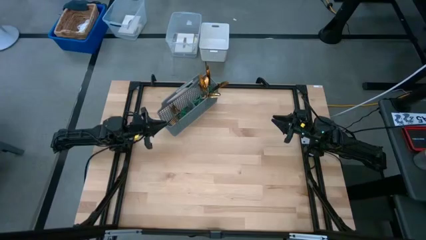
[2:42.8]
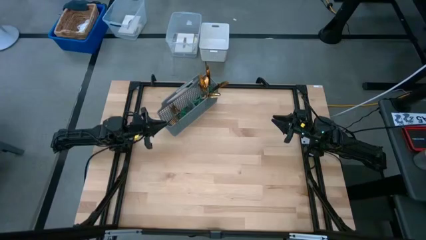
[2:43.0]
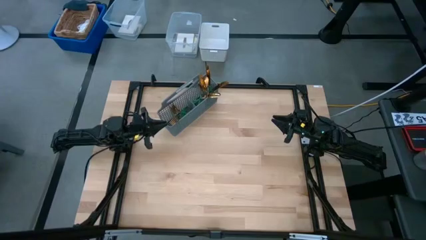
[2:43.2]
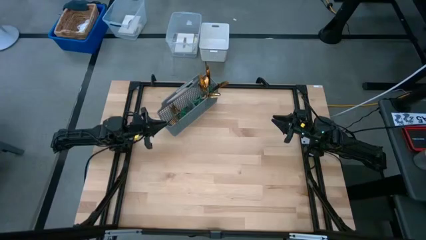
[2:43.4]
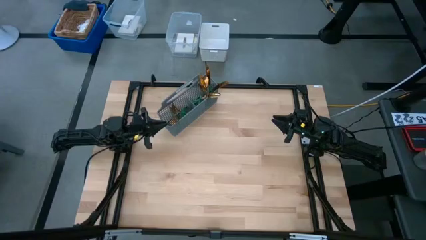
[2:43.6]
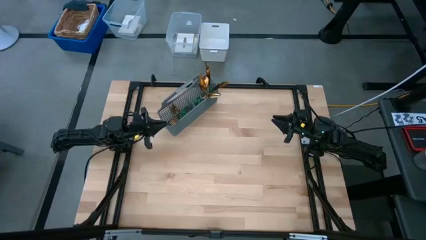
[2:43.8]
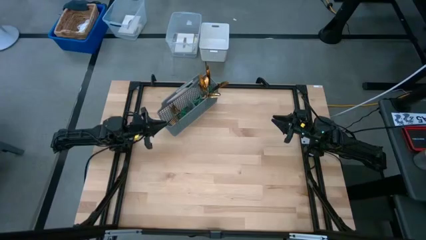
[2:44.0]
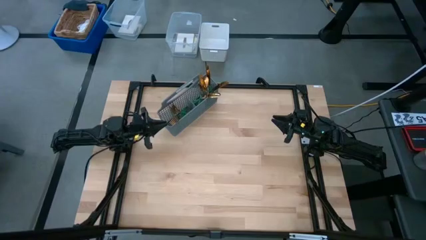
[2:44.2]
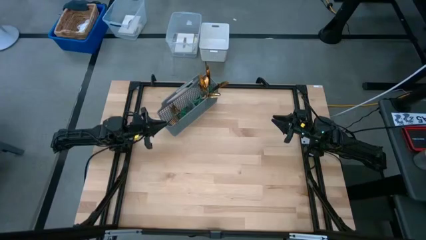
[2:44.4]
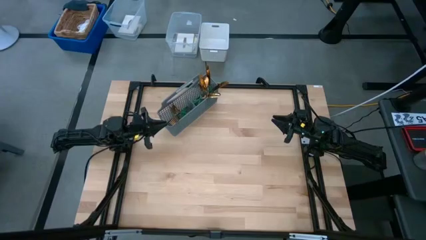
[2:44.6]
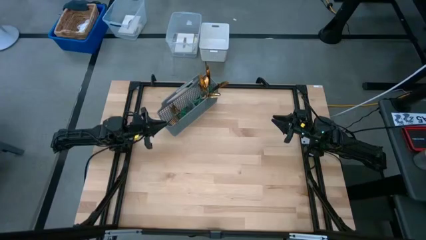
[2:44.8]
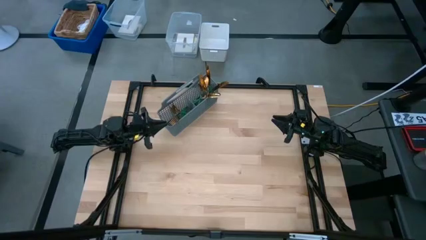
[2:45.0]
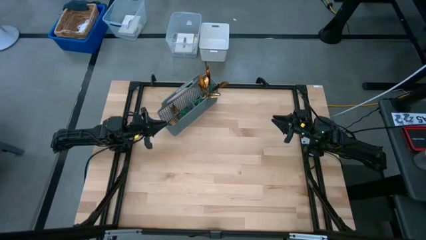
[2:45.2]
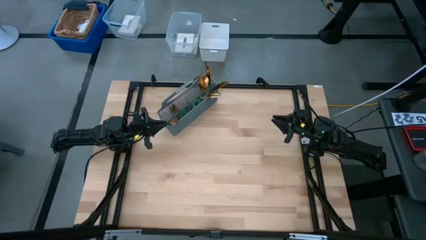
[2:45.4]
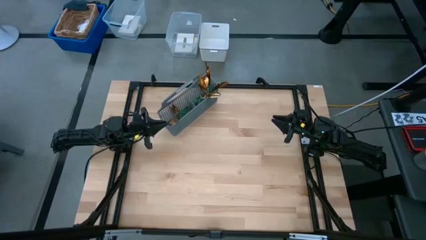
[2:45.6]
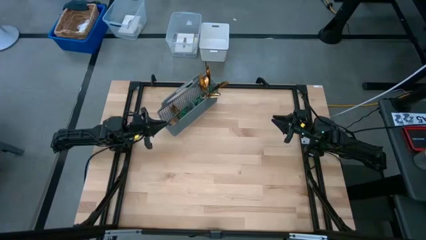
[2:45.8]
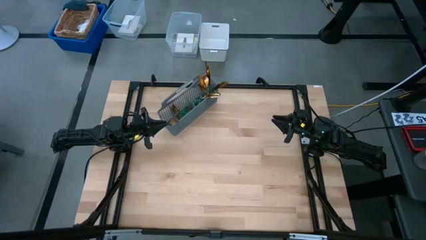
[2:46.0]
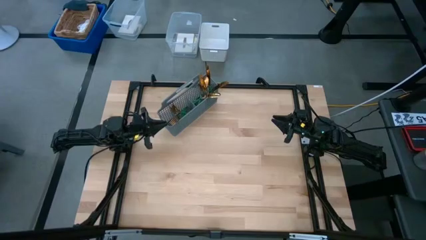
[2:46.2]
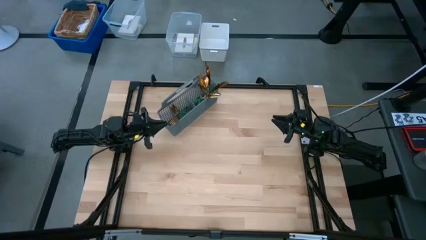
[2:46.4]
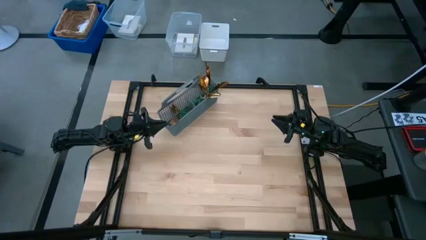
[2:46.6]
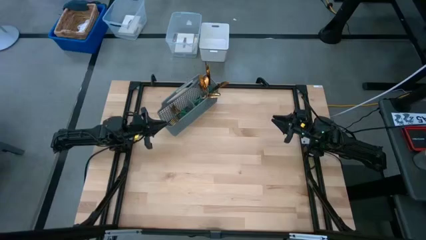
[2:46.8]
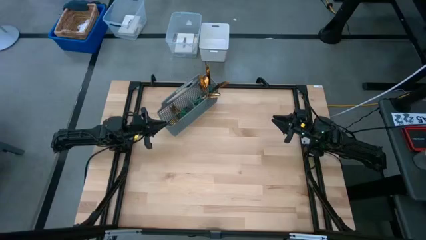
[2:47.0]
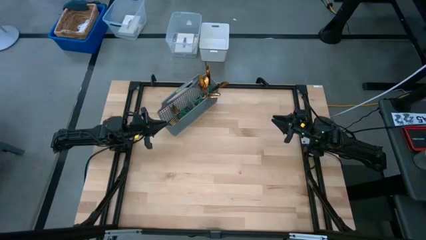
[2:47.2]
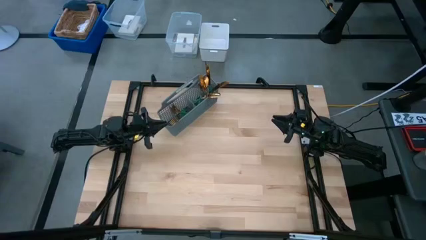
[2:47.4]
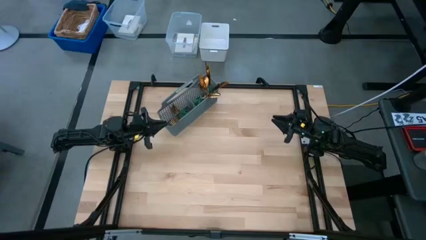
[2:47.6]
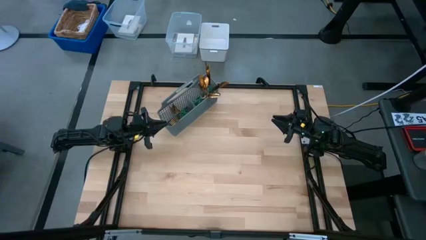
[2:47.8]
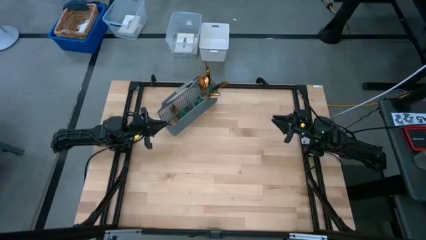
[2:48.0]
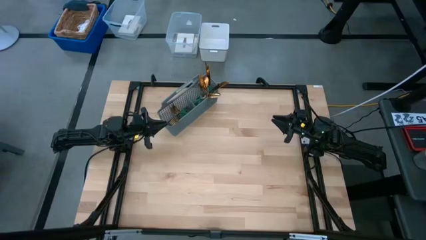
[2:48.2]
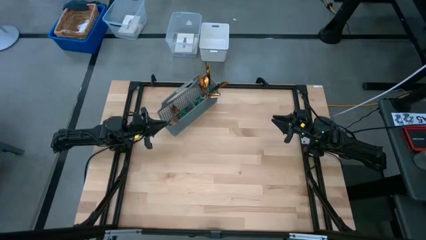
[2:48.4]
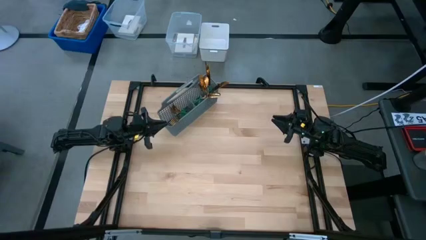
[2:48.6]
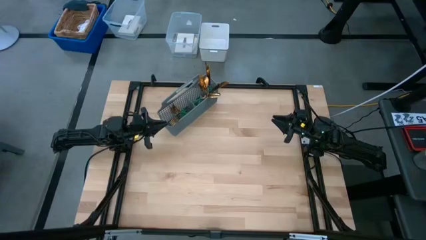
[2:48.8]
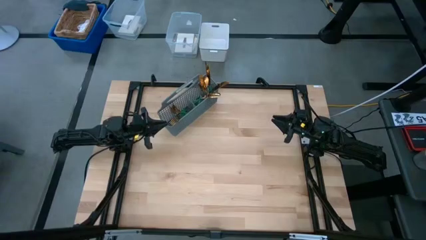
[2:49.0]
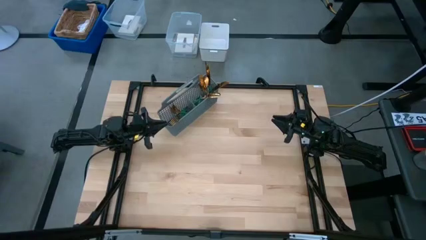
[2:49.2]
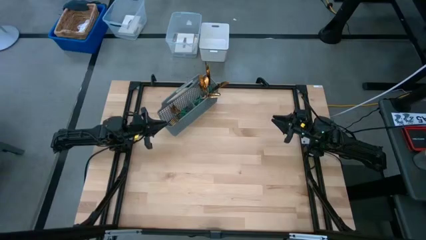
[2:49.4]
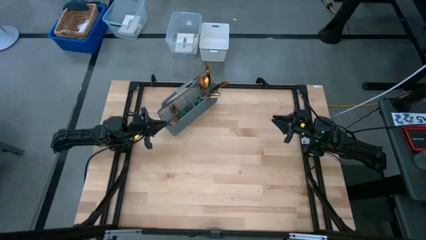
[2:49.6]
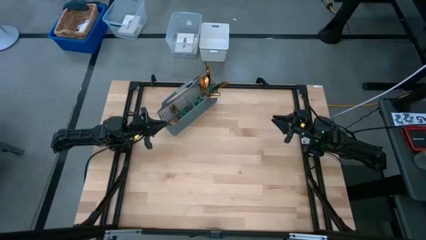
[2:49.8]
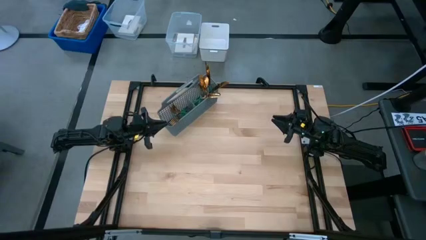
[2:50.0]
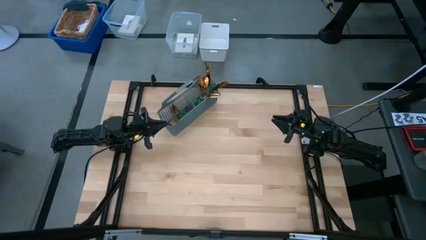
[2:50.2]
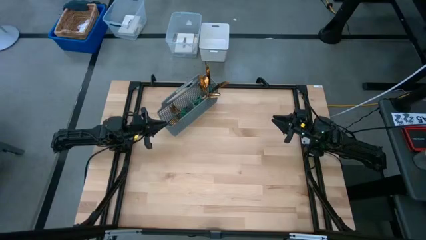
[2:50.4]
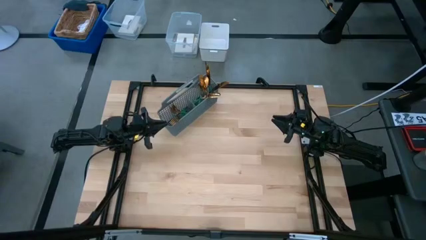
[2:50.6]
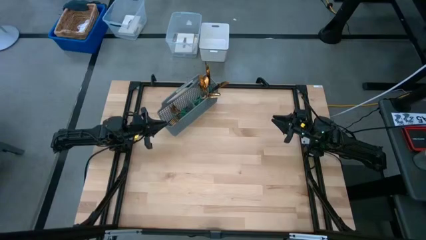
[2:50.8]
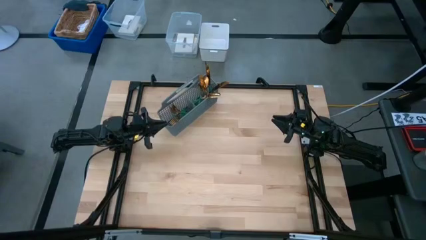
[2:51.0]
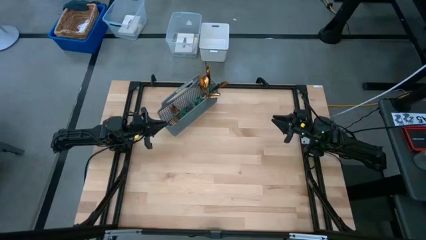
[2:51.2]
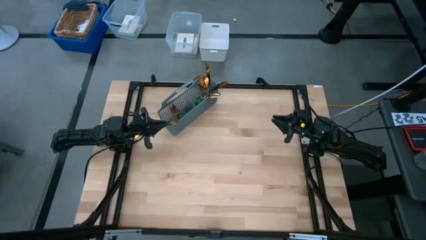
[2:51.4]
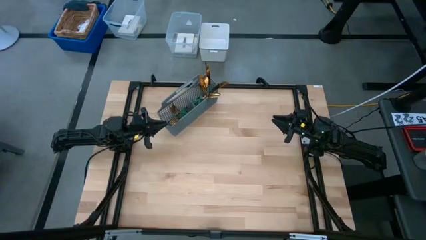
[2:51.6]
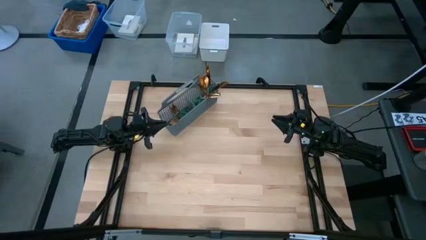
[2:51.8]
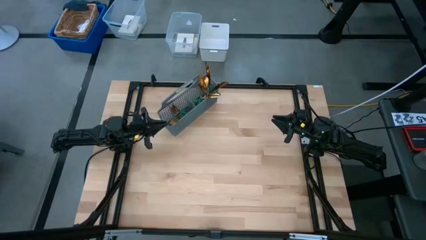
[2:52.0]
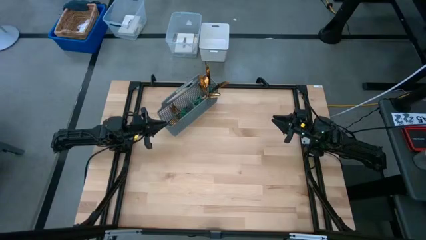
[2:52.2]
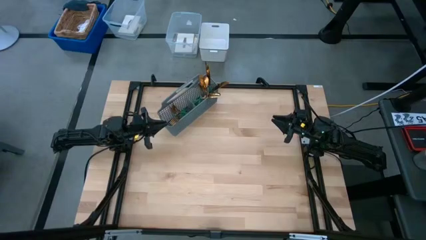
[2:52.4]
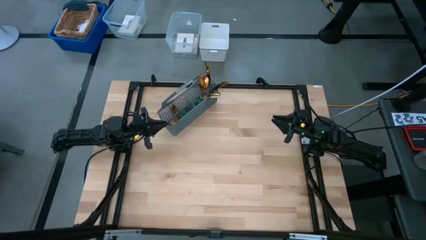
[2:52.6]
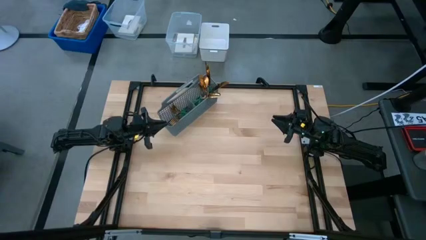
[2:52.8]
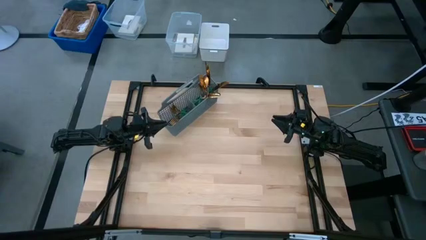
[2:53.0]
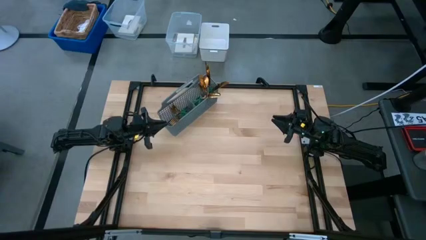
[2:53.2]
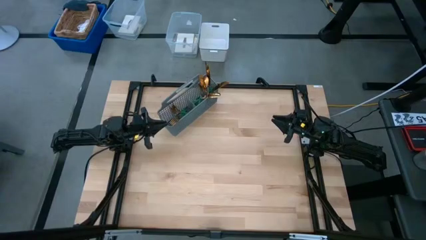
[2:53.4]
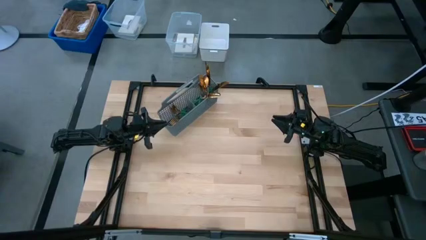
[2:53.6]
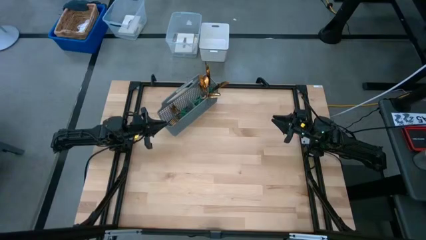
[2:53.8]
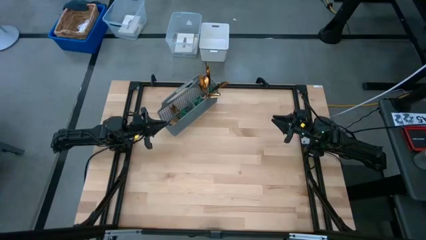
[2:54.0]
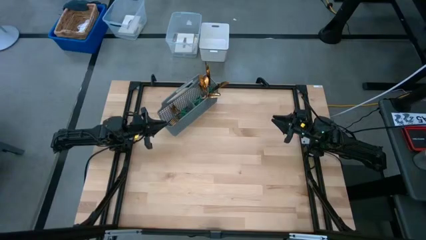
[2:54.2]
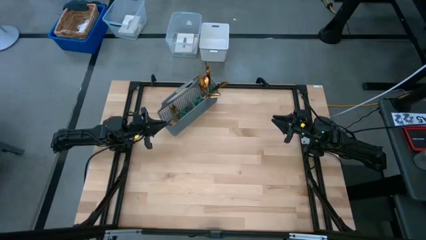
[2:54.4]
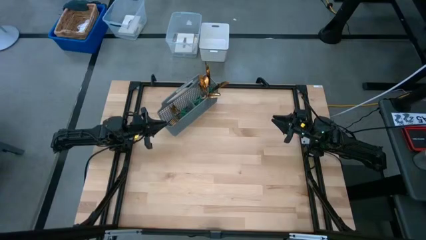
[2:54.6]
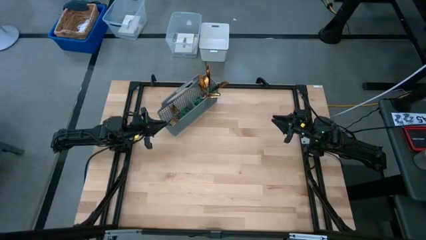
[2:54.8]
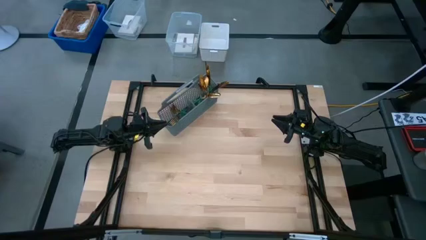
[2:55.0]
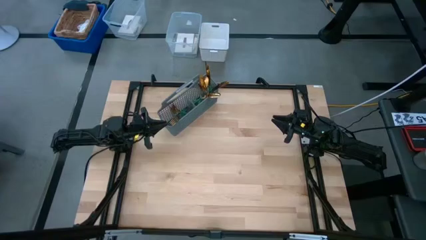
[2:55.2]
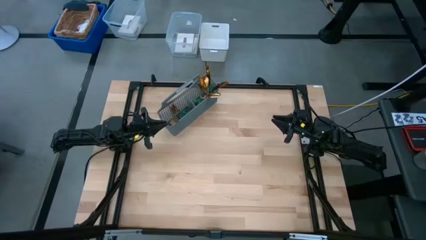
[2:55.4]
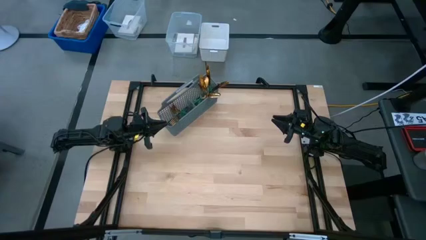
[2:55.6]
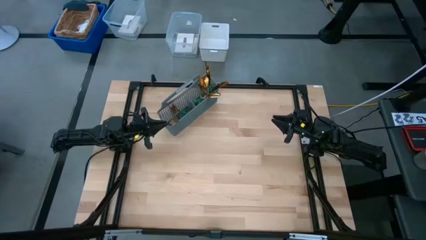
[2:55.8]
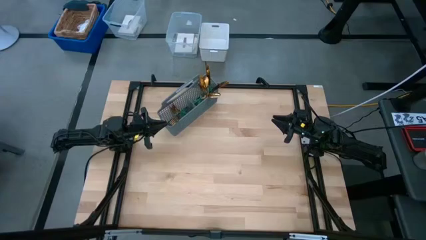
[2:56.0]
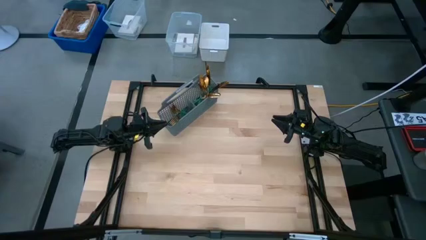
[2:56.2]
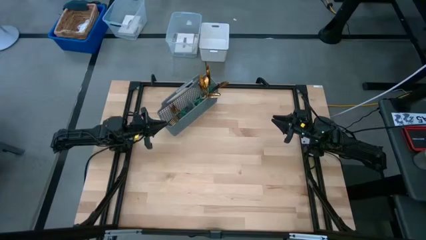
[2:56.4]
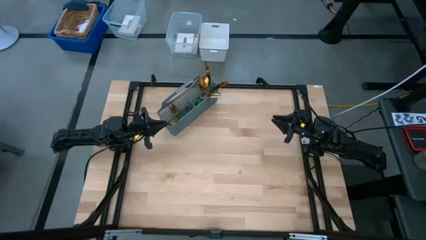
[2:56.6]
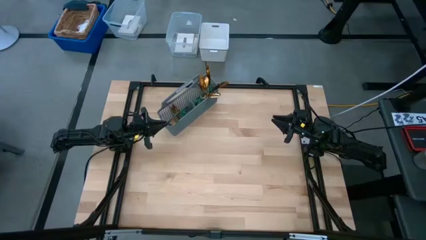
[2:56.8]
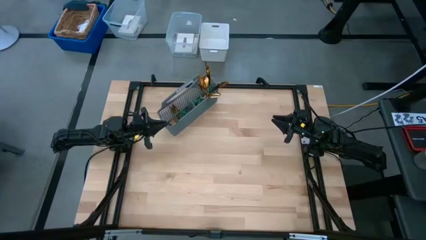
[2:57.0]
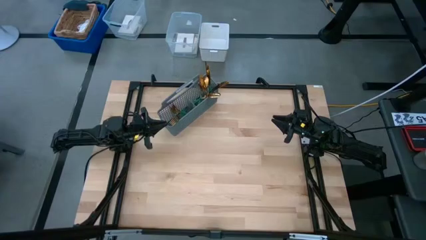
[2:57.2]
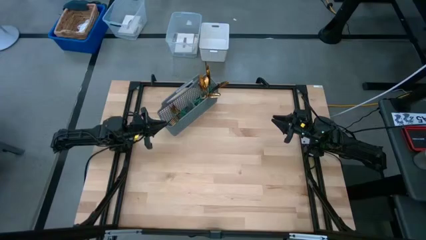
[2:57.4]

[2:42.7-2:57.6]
Task: Sort silverware
Return to Home Position
